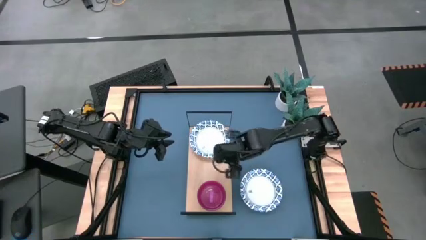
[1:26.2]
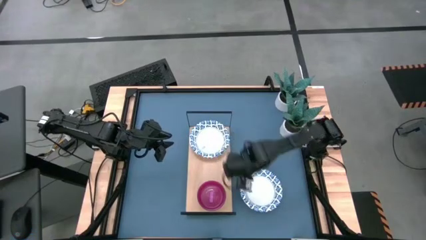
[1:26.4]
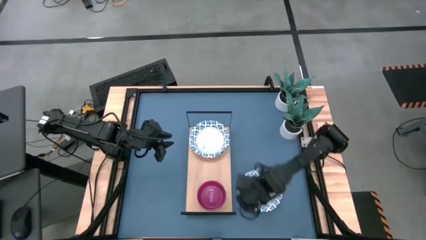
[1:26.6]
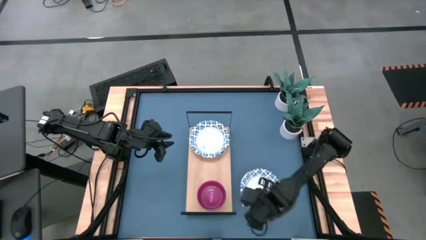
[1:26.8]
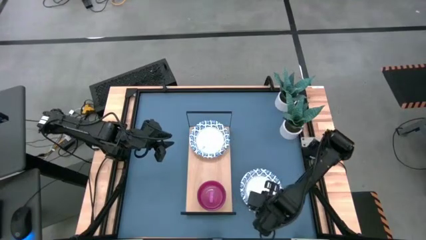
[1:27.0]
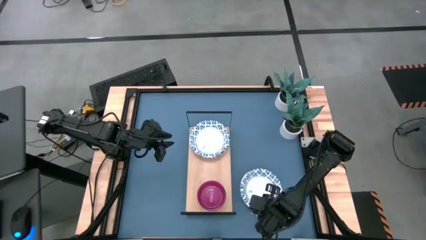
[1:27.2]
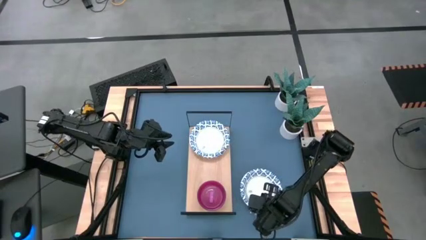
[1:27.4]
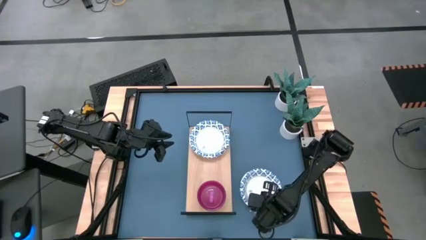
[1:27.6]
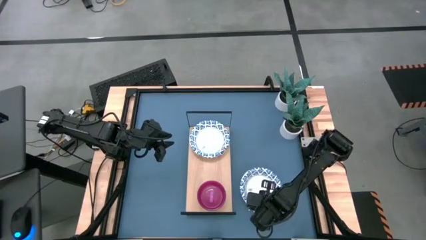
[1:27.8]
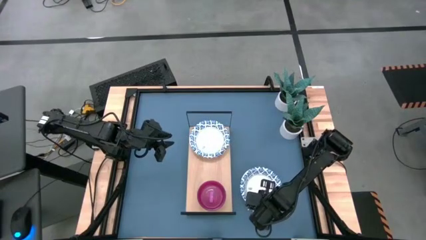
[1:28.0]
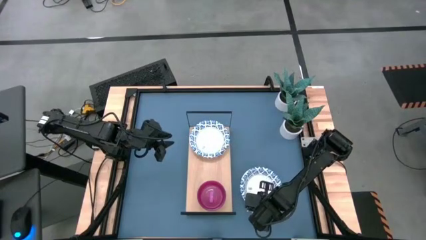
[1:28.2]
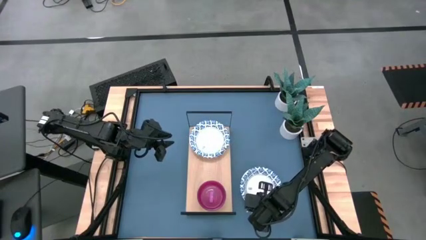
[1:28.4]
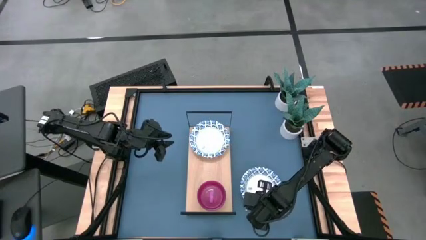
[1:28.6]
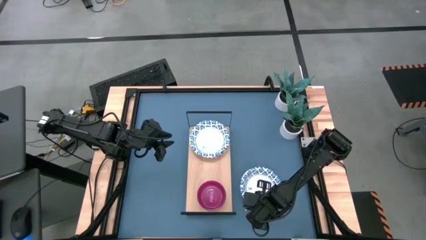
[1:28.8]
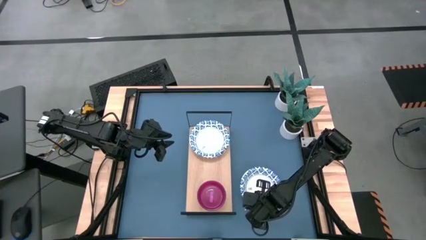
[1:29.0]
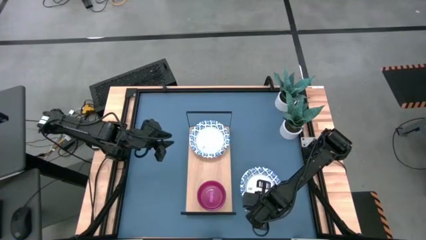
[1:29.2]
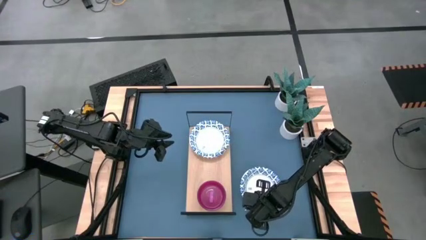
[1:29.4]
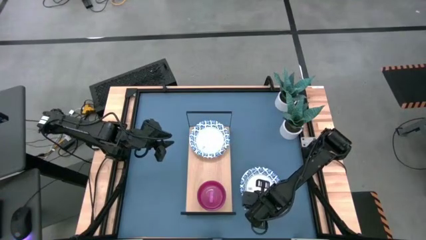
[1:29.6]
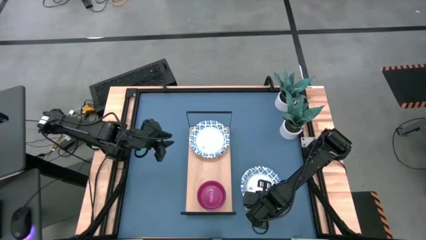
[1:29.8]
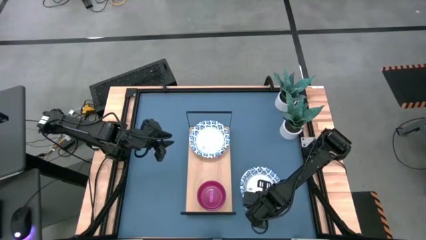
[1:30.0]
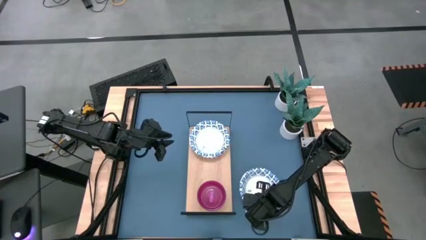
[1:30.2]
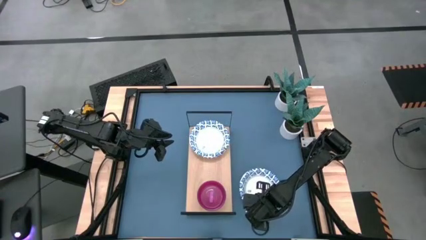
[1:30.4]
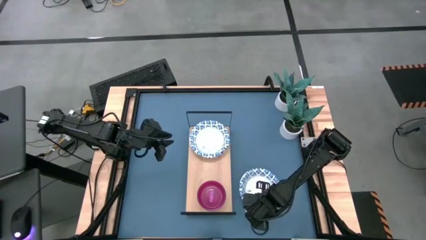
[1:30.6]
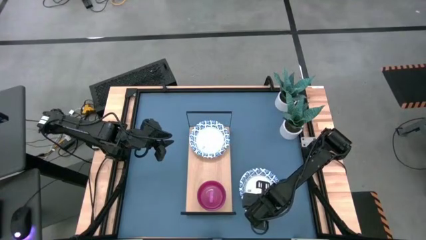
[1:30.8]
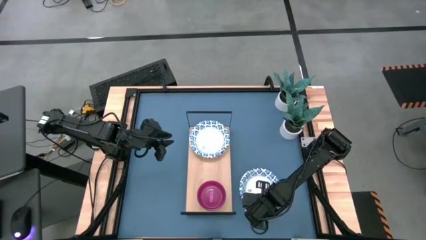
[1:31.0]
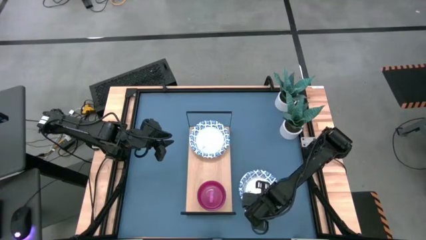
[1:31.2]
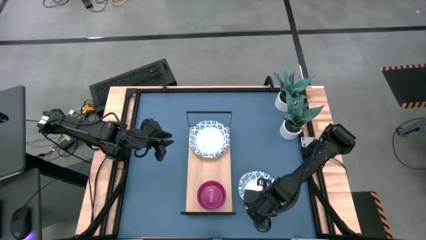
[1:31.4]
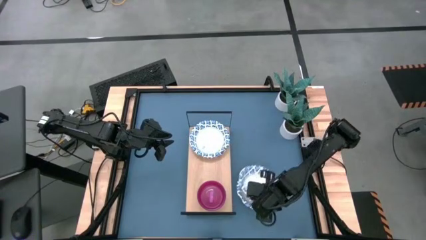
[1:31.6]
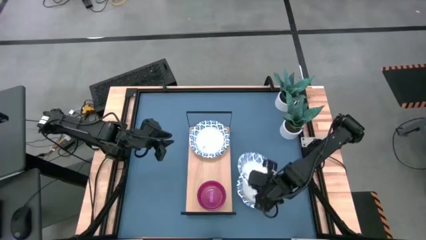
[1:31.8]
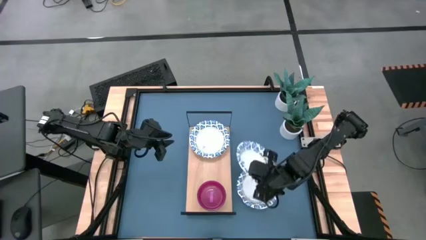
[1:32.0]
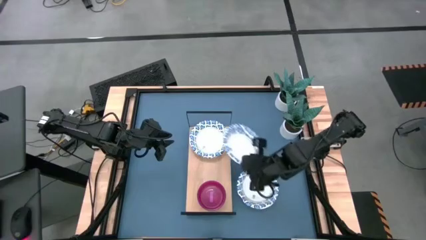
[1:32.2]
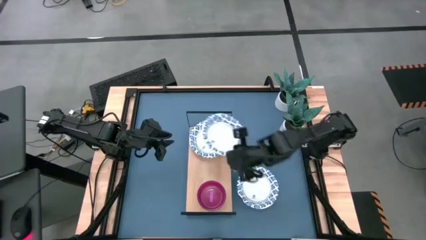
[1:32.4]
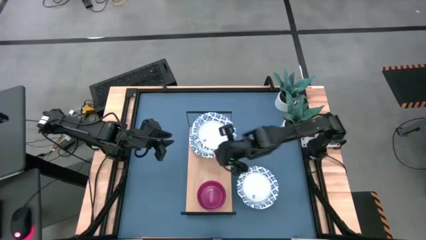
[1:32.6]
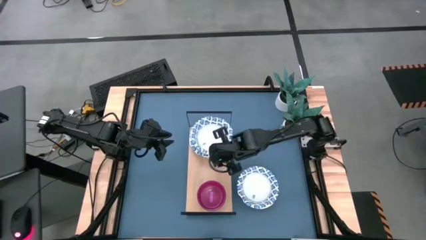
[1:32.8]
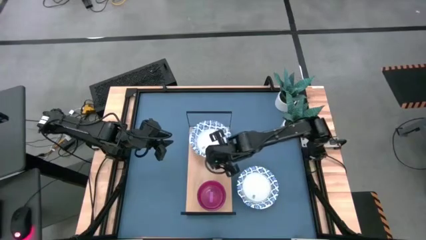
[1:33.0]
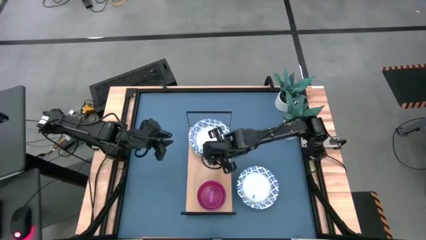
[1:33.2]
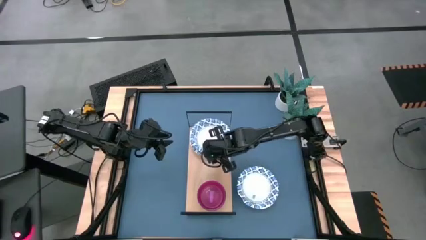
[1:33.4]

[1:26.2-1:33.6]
Task: Place and stack bowls onto a shelf
Stack the right white bowl on top of the white bowl on the shelf

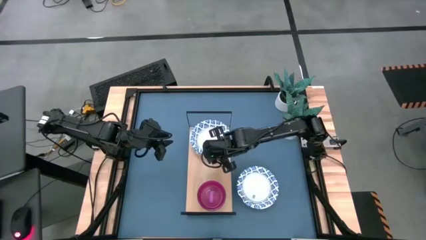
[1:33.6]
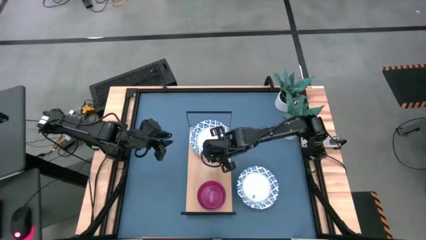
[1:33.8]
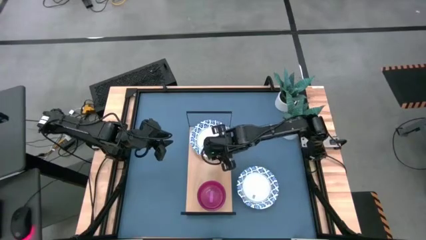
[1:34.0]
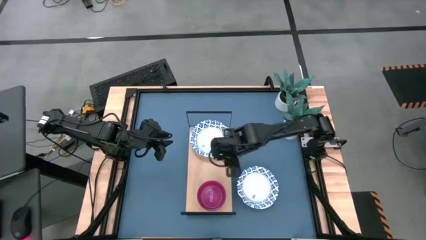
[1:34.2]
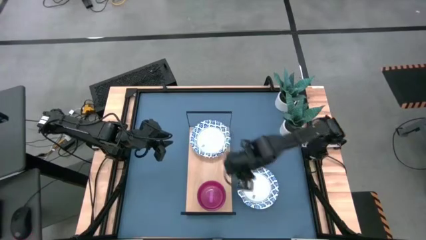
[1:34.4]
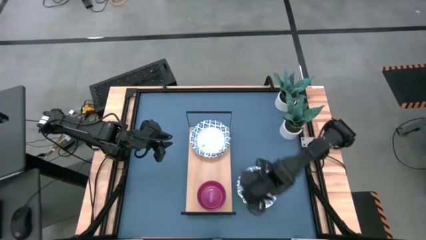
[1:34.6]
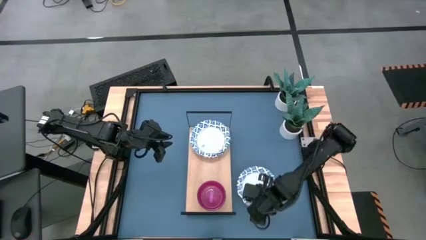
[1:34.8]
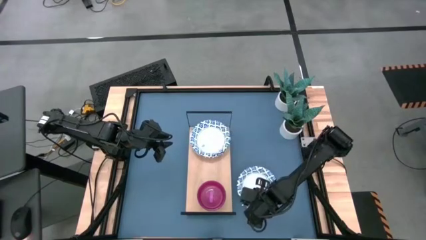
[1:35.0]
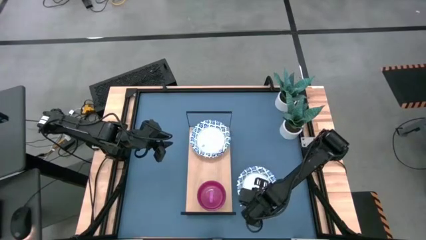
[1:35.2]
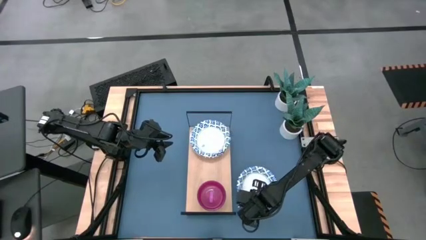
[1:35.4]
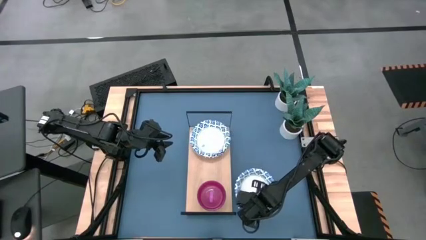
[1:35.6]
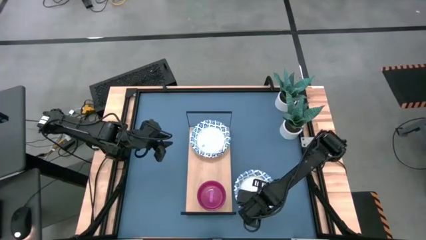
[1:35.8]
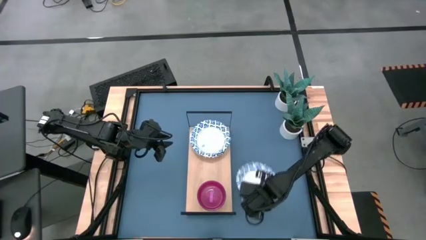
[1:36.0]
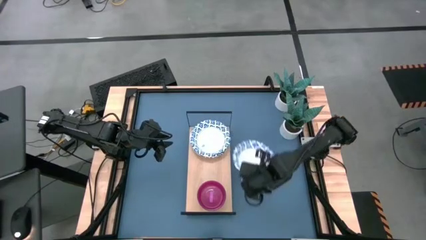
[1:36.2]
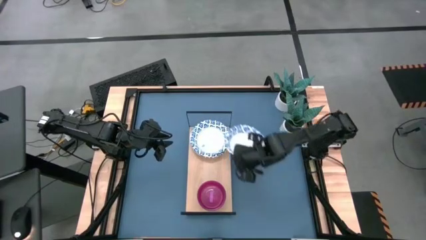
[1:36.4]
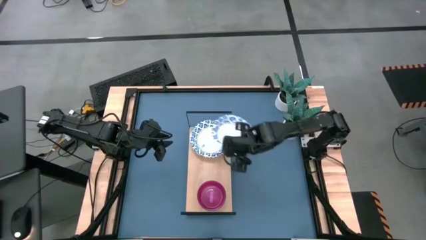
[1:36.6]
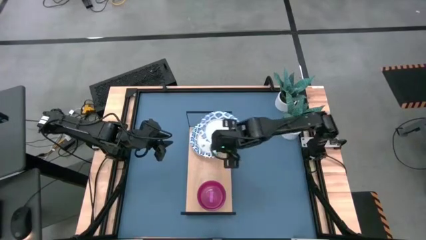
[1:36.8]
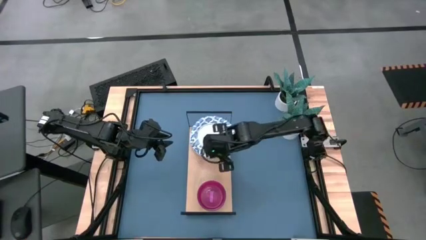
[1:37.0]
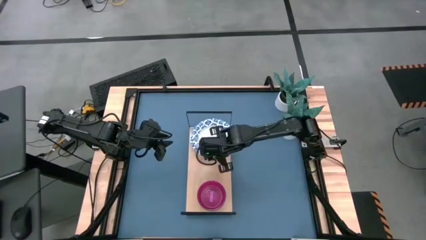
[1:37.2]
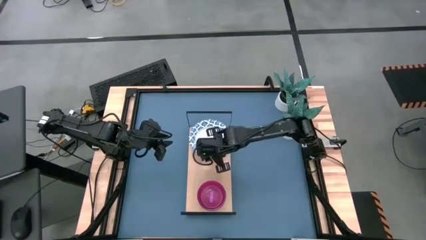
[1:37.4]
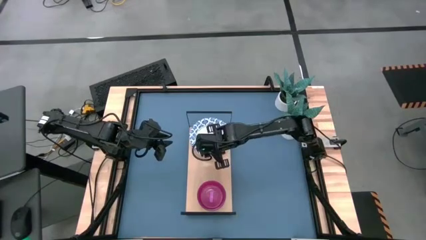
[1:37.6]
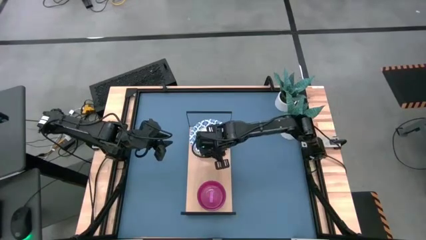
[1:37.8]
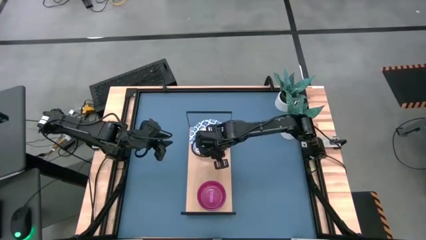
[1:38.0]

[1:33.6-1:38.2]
Stack the right white bowl on top of the white bowl on the shelf

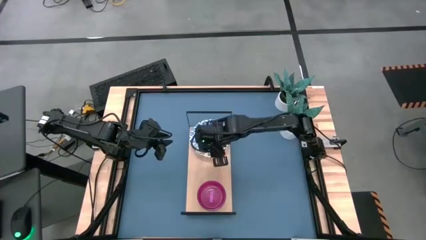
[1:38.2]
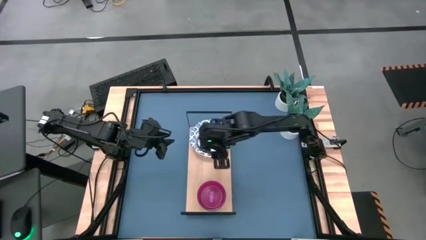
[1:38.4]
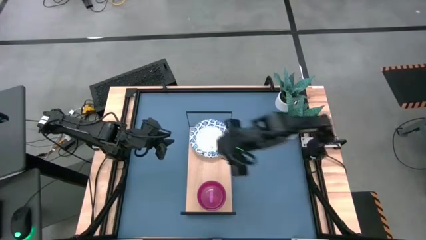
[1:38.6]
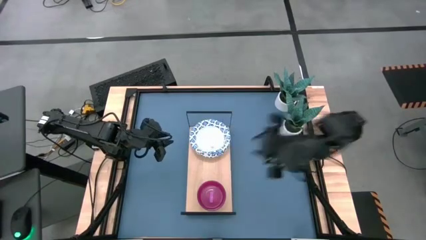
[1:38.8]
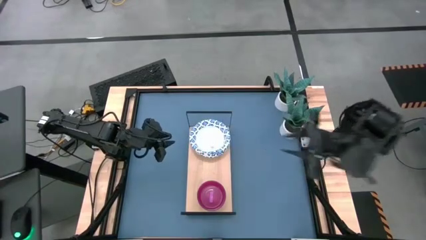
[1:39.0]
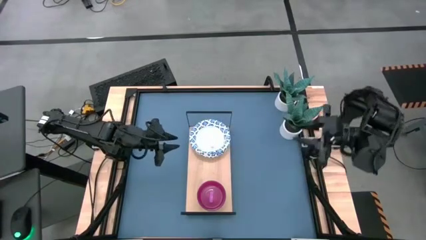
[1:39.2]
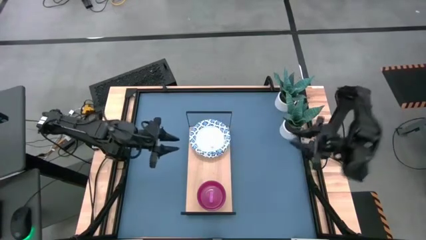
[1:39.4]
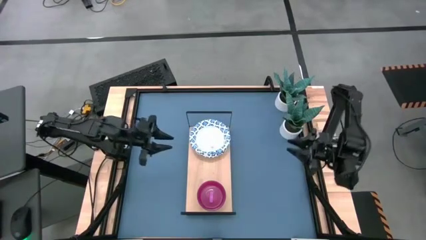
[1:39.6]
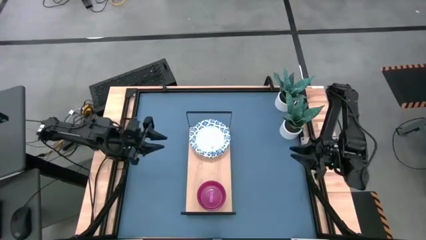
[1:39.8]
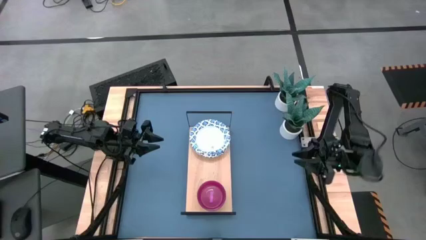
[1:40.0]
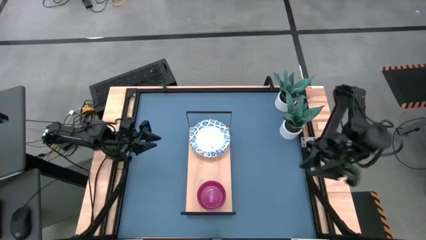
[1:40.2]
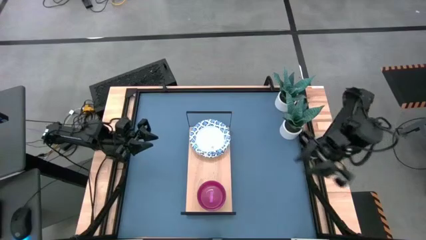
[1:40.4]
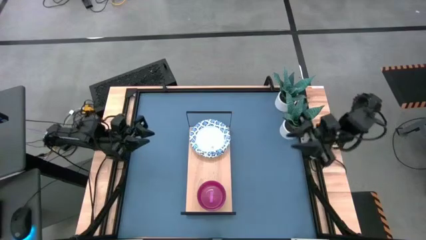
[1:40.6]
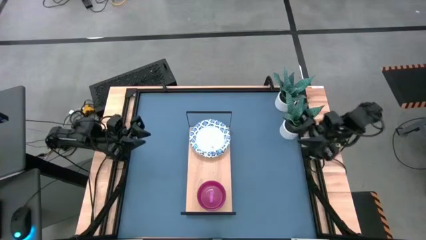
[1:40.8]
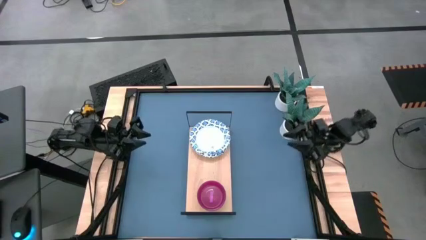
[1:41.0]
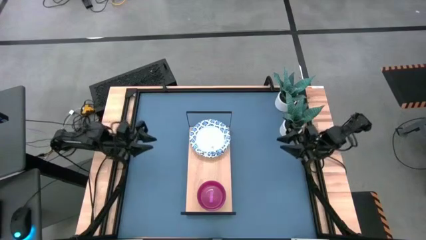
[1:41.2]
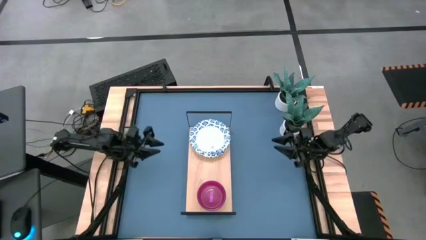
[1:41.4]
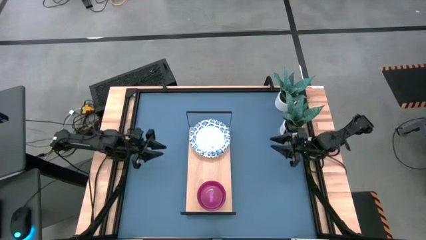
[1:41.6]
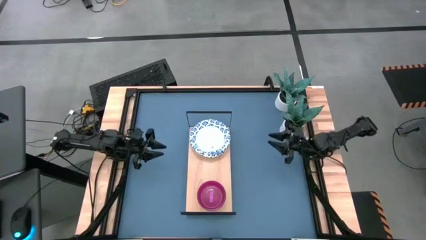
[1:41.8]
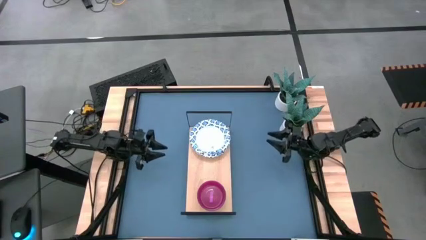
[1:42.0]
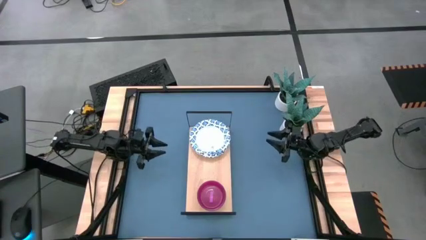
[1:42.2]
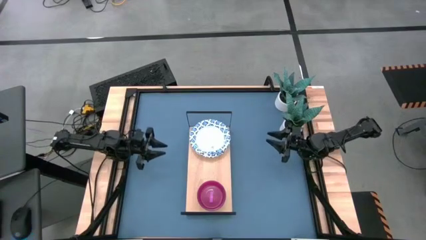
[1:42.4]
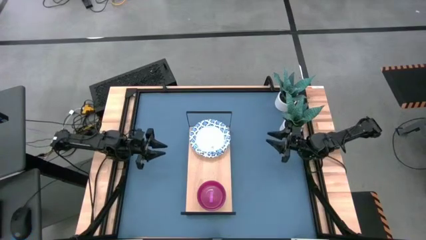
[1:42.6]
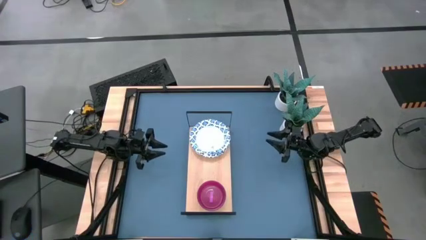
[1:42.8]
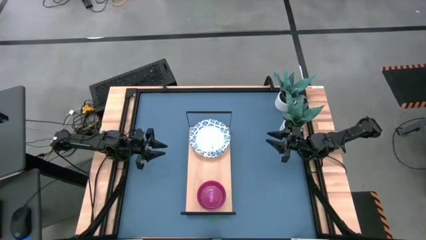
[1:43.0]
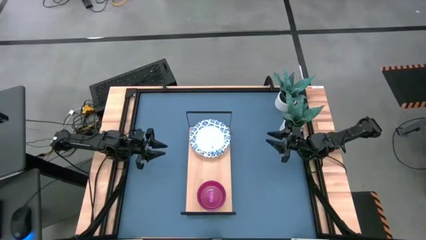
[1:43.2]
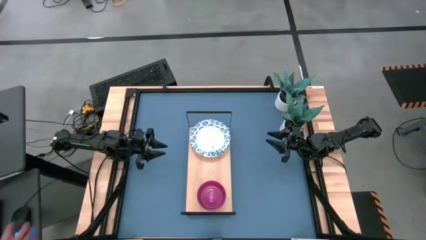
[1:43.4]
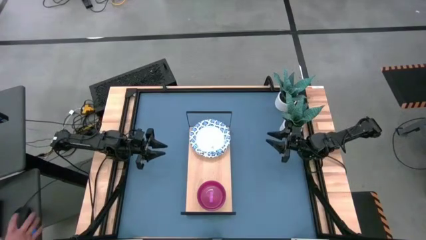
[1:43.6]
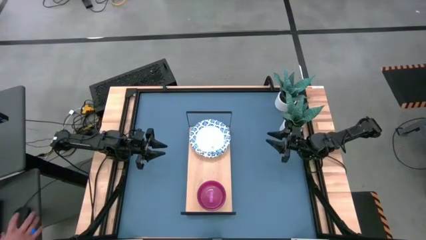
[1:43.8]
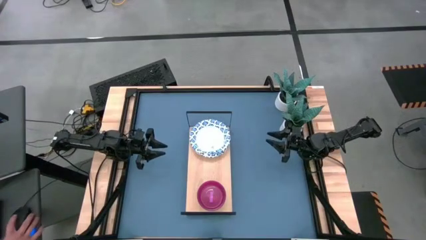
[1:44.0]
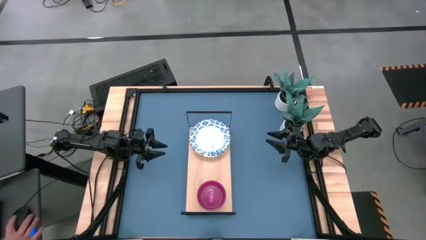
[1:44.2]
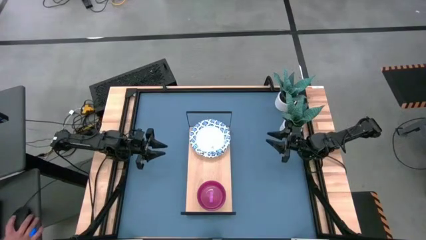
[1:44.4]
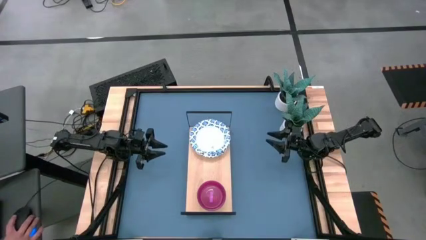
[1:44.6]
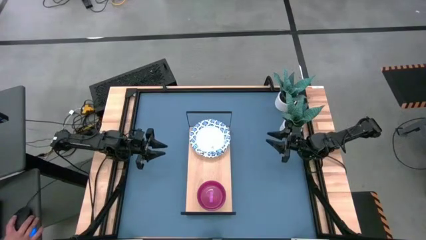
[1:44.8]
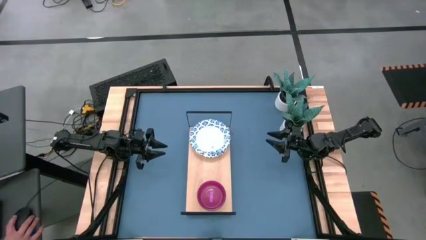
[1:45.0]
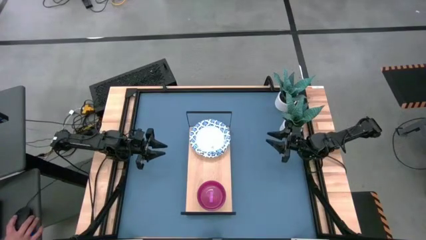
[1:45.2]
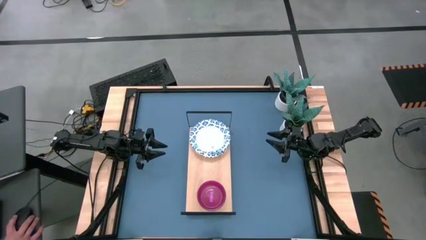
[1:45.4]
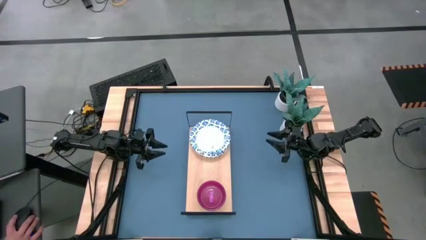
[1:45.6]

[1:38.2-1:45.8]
Return to Home Position
